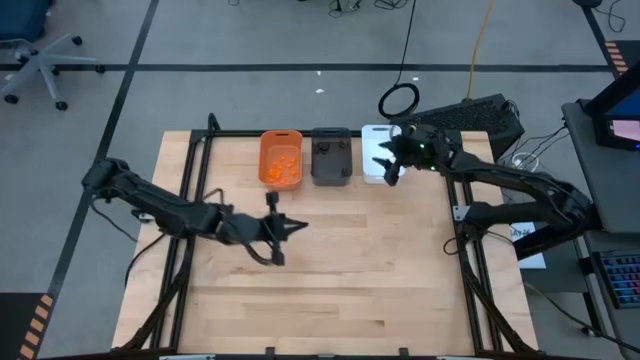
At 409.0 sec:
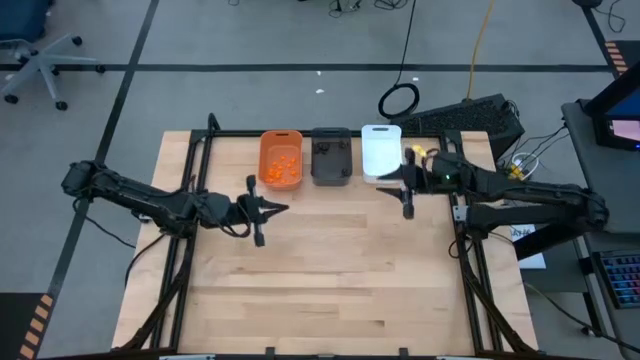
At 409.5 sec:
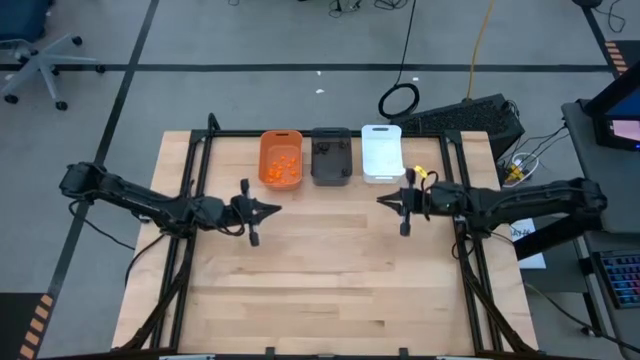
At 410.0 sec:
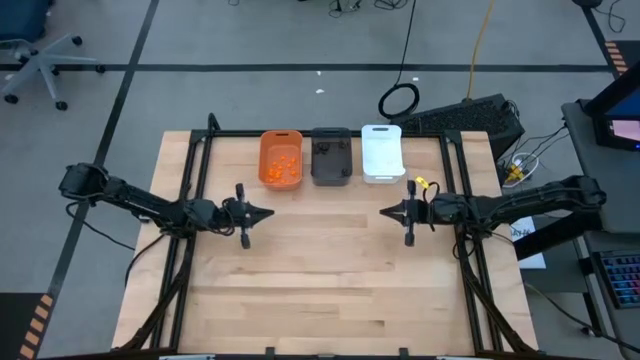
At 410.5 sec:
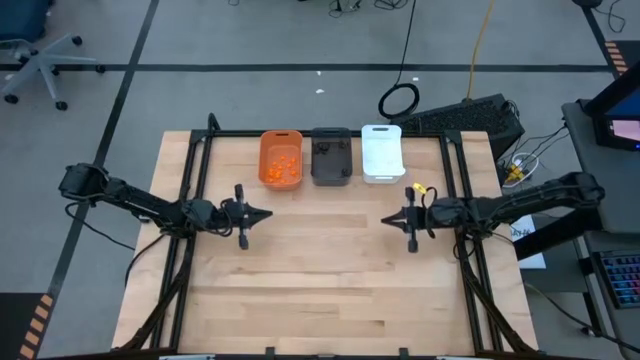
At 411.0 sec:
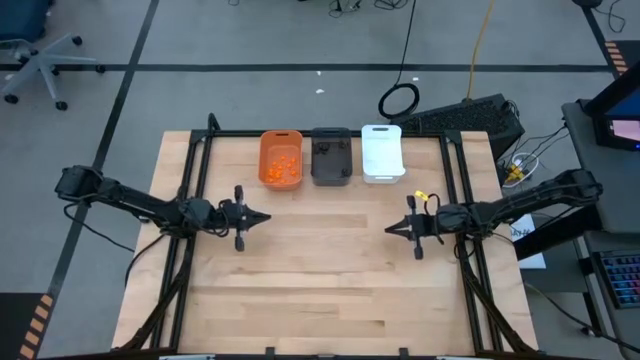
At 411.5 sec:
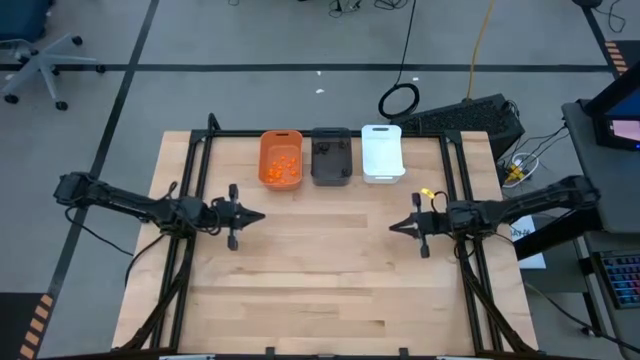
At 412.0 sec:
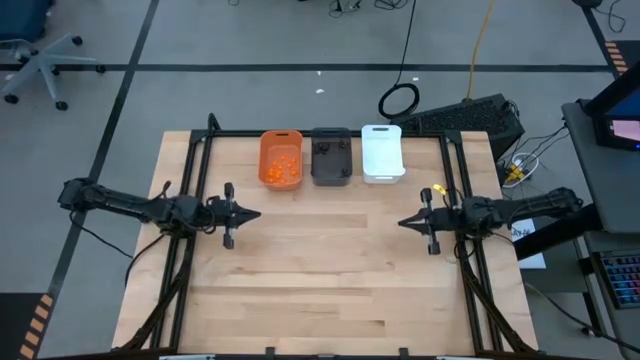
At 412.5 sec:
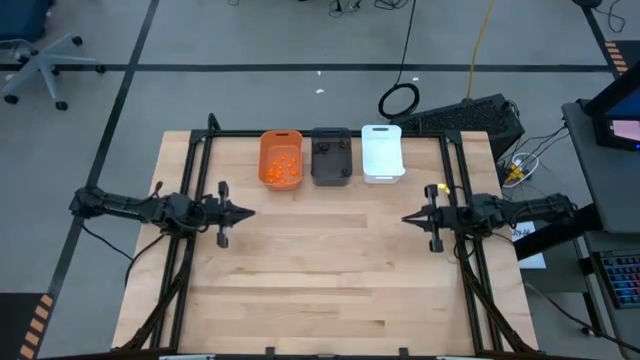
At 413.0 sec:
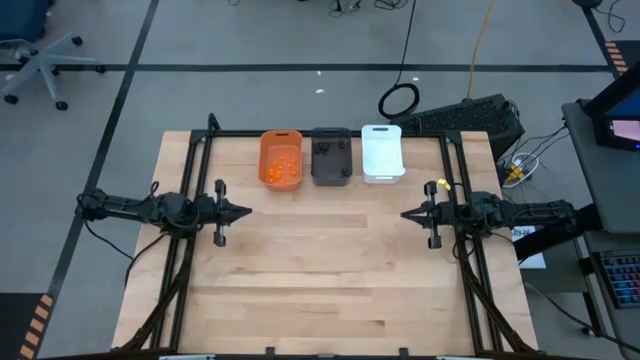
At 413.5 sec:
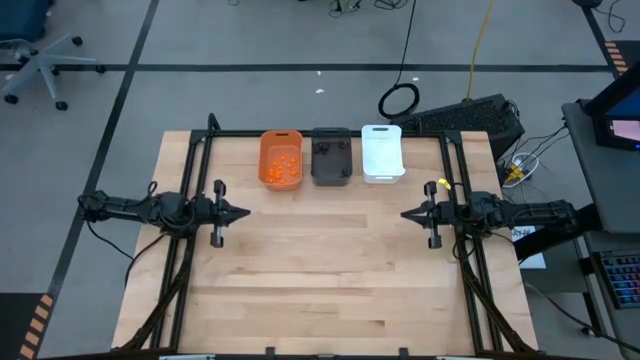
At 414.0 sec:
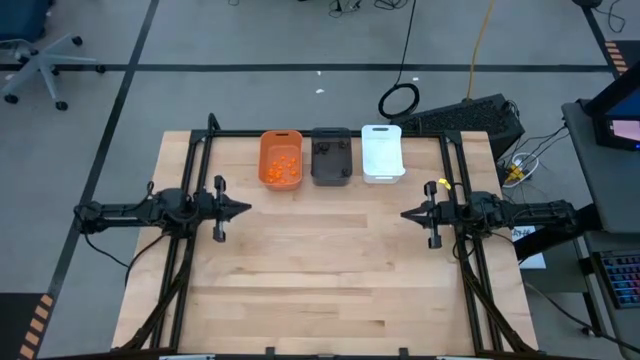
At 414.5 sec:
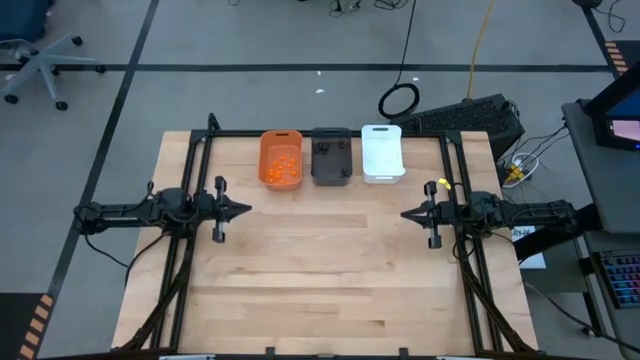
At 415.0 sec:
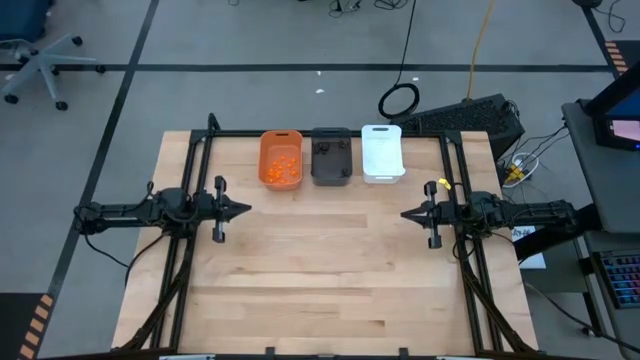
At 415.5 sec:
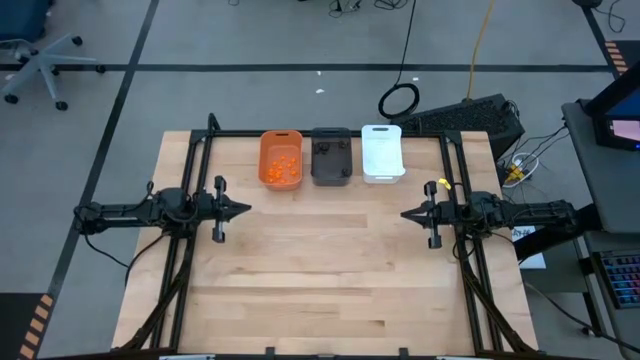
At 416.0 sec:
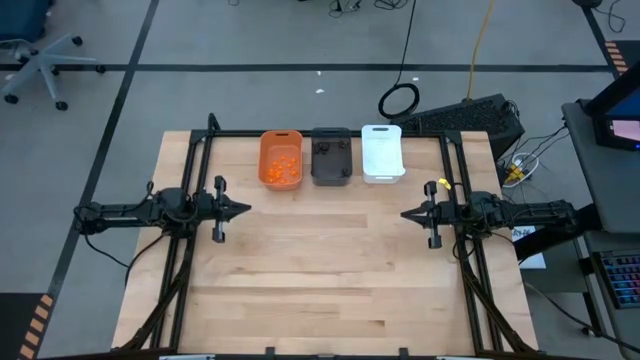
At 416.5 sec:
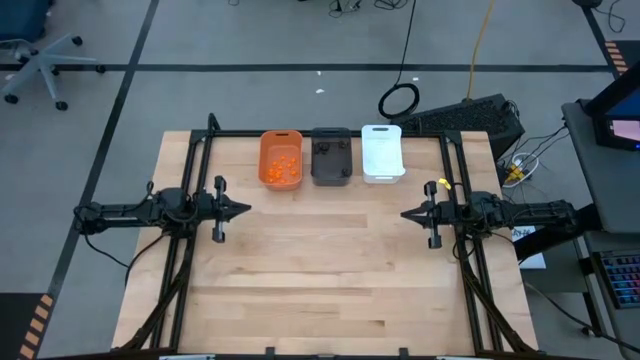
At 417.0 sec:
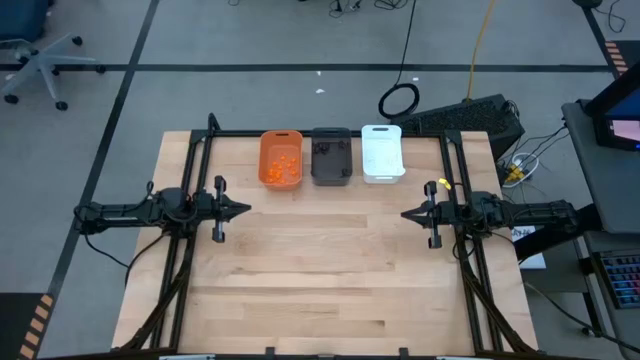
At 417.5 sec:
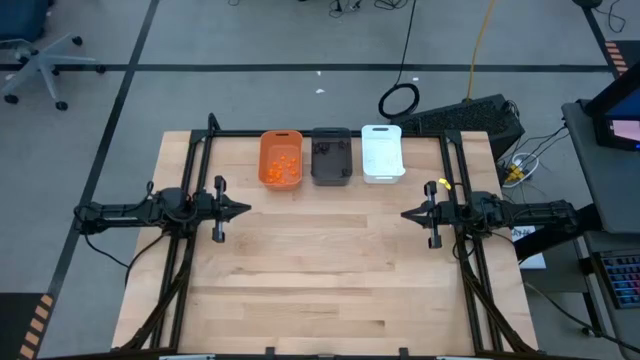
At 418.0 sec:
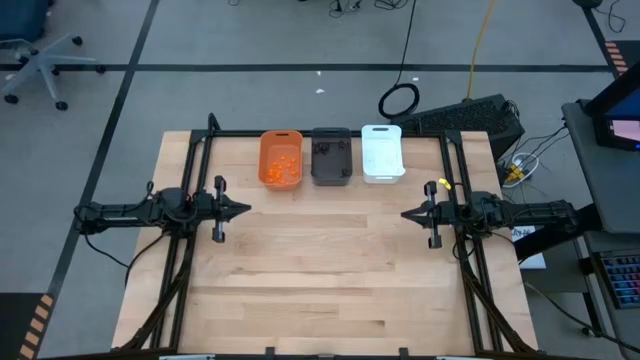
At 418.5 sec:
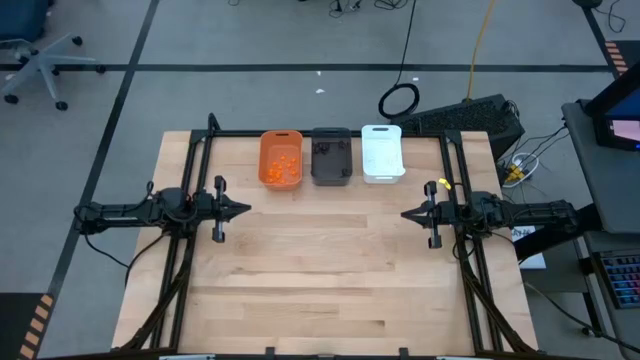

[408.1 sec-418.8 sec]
Task: Sort Halloween decoration
Return to Home Position
